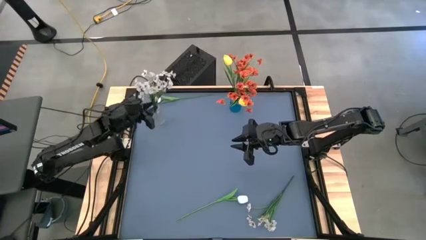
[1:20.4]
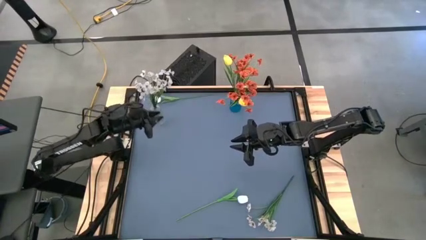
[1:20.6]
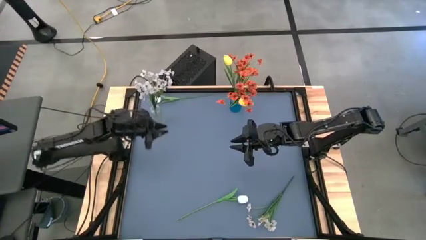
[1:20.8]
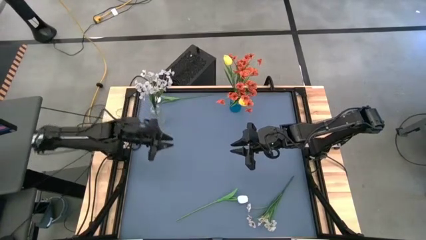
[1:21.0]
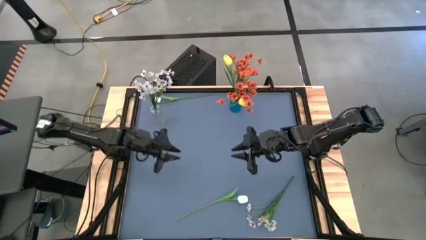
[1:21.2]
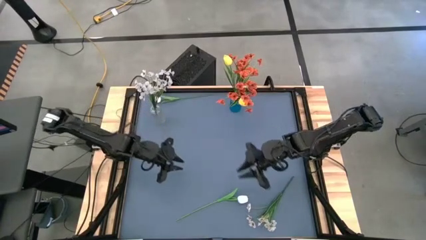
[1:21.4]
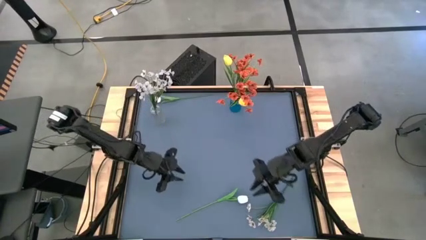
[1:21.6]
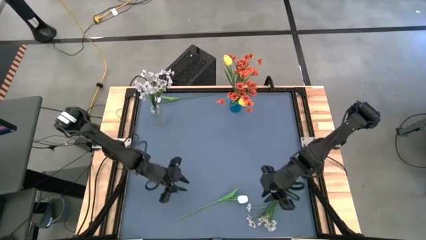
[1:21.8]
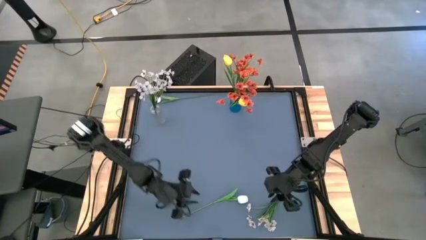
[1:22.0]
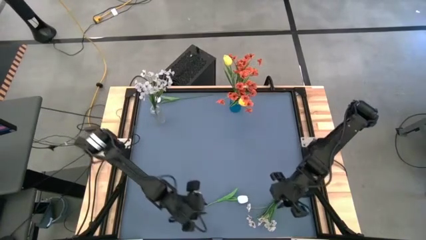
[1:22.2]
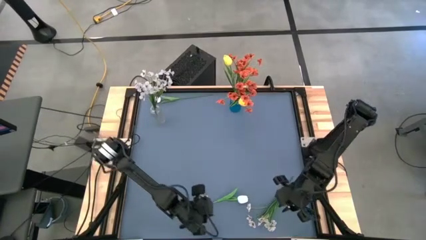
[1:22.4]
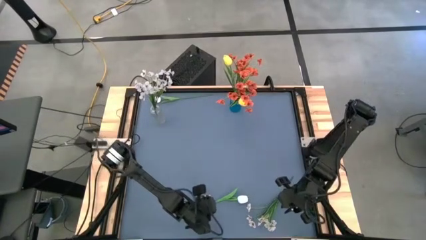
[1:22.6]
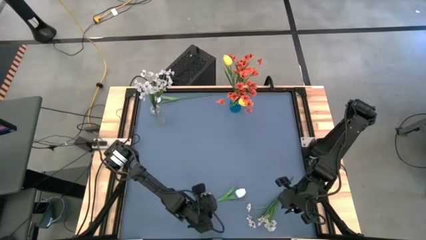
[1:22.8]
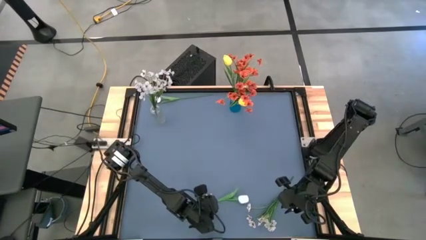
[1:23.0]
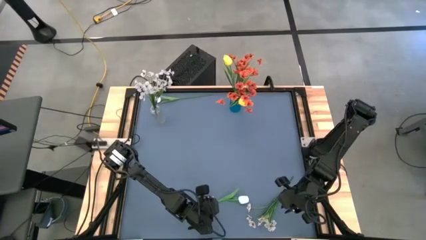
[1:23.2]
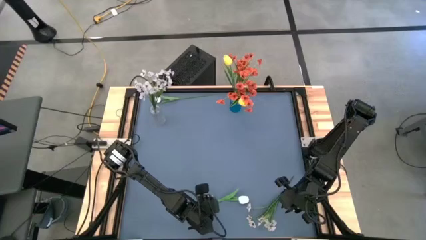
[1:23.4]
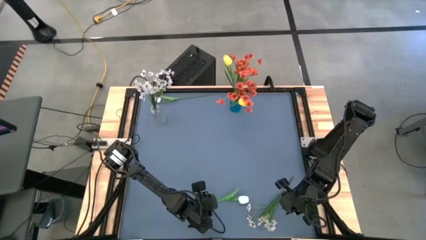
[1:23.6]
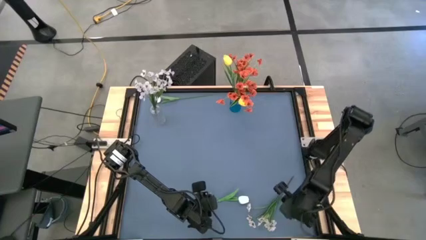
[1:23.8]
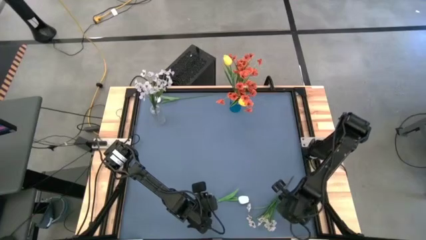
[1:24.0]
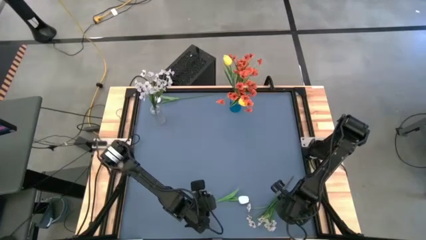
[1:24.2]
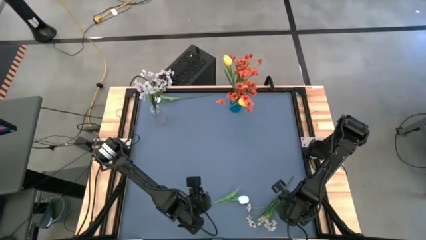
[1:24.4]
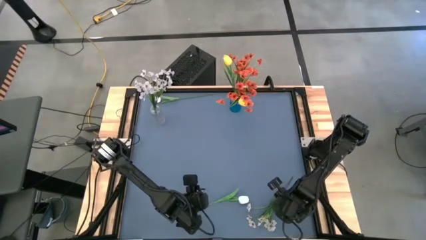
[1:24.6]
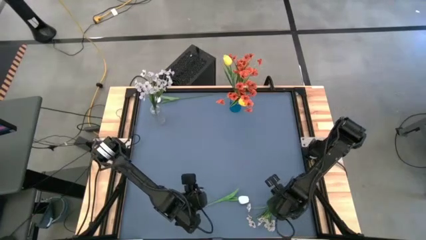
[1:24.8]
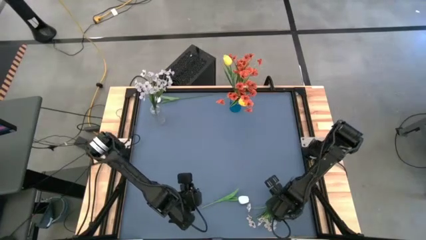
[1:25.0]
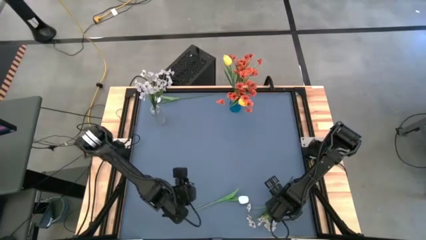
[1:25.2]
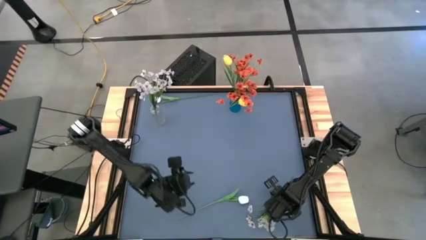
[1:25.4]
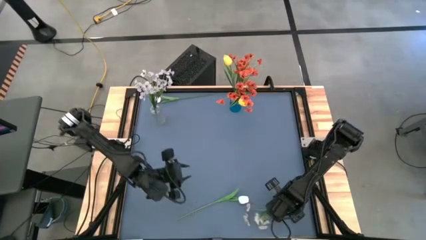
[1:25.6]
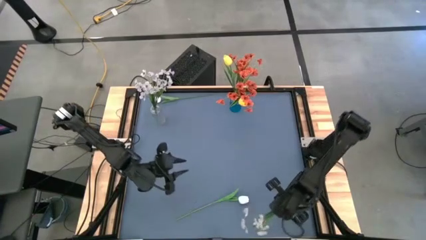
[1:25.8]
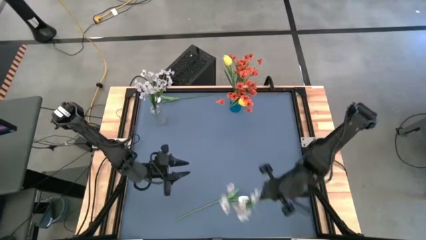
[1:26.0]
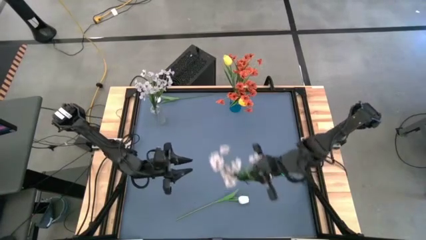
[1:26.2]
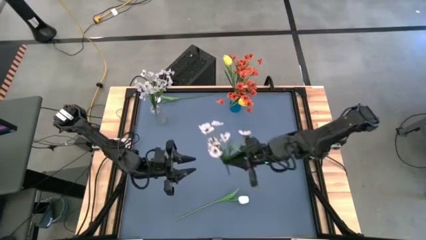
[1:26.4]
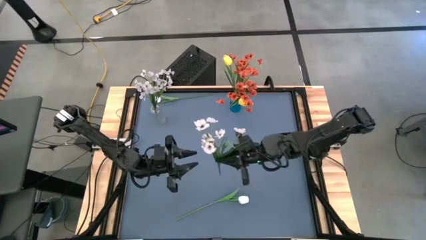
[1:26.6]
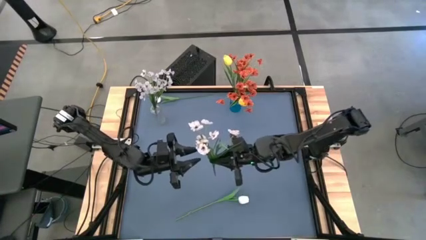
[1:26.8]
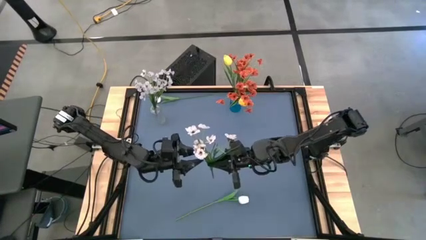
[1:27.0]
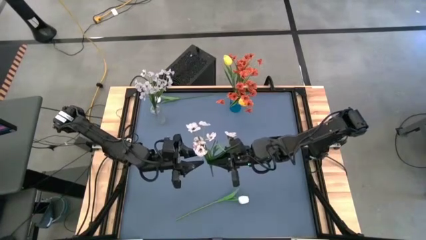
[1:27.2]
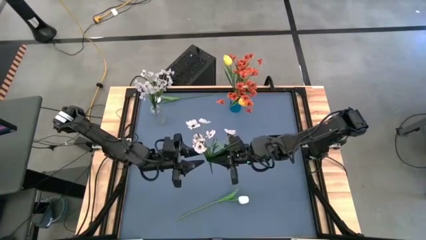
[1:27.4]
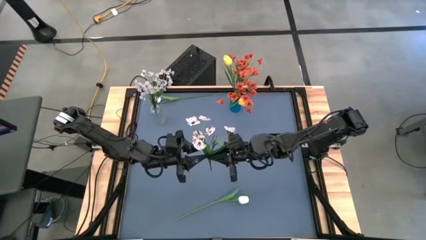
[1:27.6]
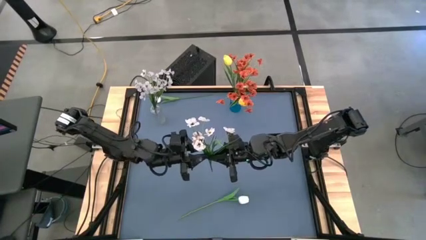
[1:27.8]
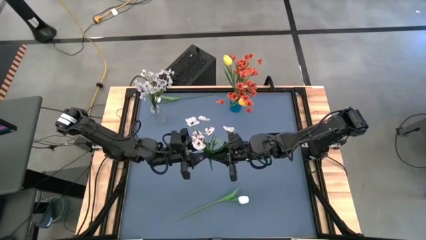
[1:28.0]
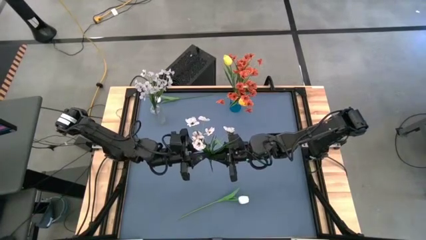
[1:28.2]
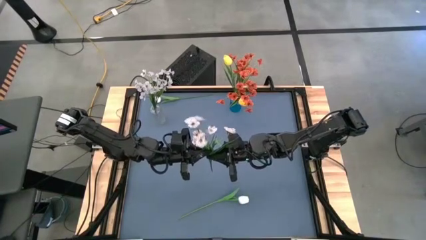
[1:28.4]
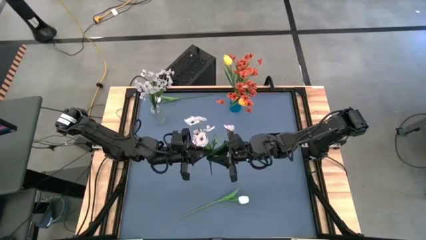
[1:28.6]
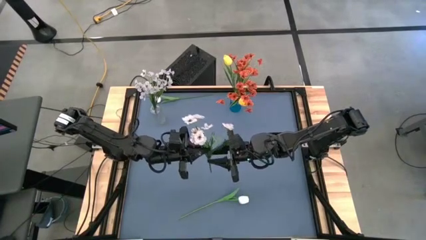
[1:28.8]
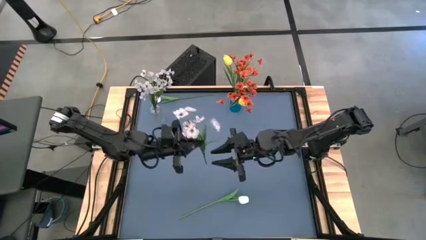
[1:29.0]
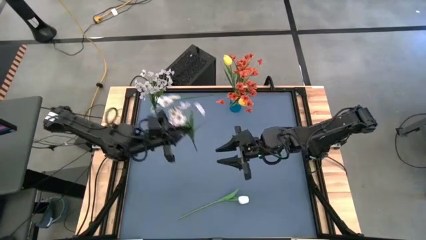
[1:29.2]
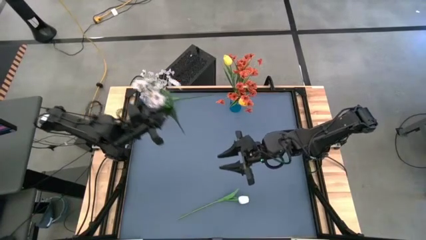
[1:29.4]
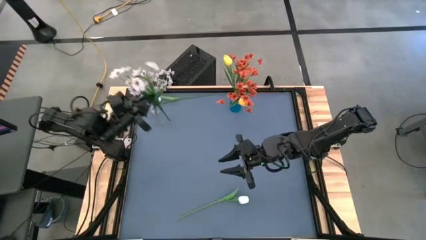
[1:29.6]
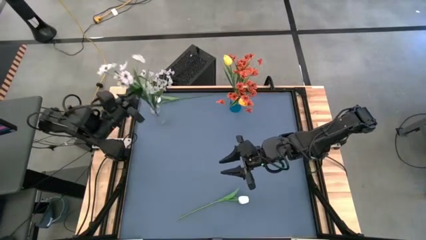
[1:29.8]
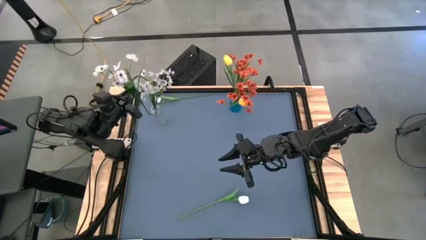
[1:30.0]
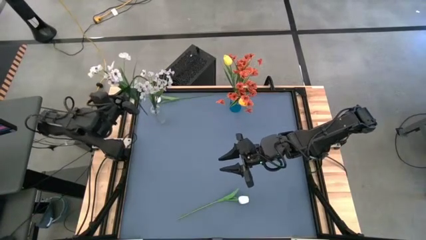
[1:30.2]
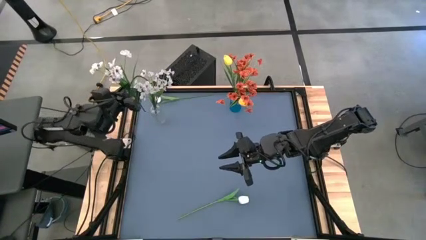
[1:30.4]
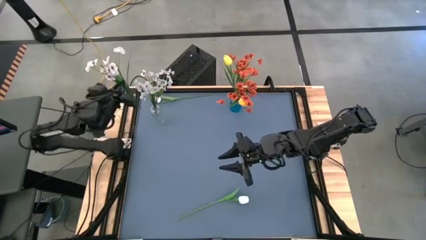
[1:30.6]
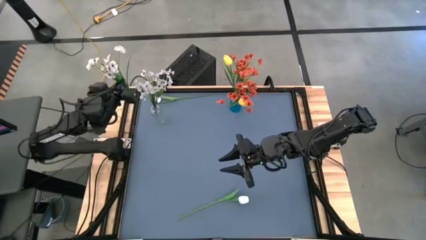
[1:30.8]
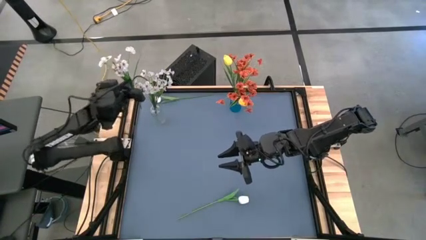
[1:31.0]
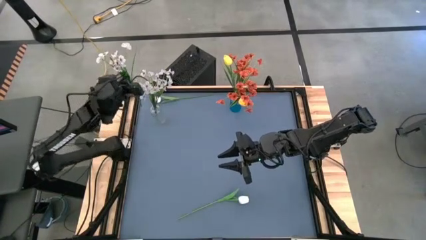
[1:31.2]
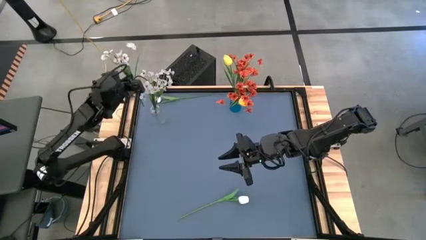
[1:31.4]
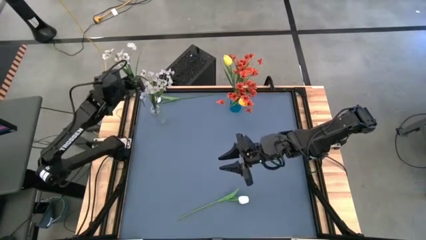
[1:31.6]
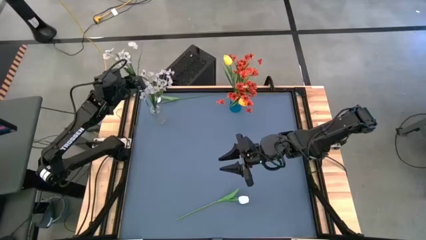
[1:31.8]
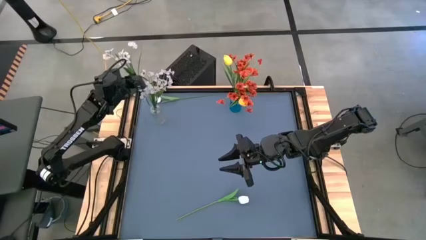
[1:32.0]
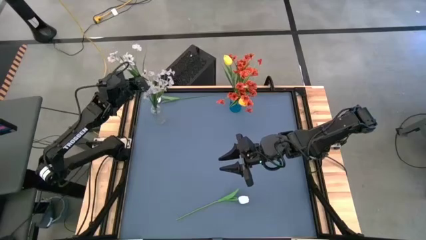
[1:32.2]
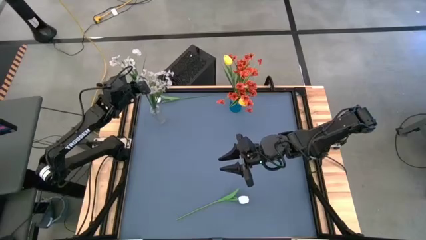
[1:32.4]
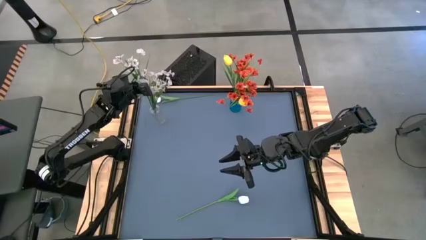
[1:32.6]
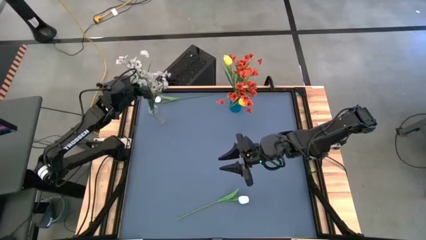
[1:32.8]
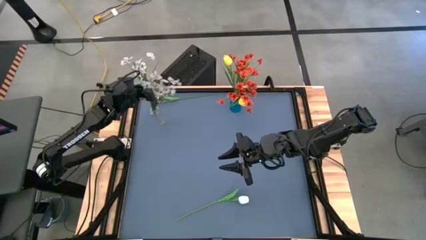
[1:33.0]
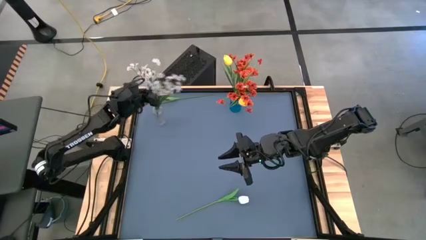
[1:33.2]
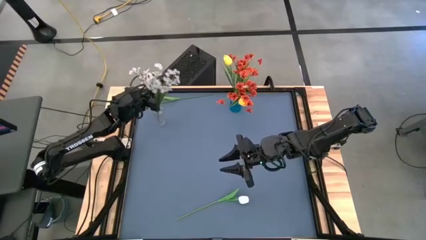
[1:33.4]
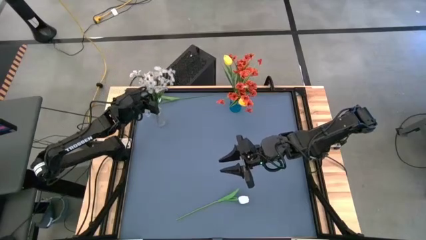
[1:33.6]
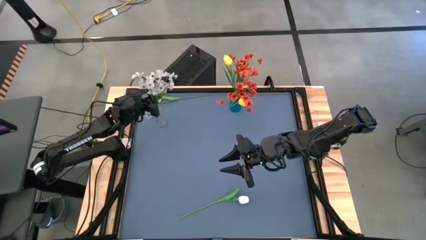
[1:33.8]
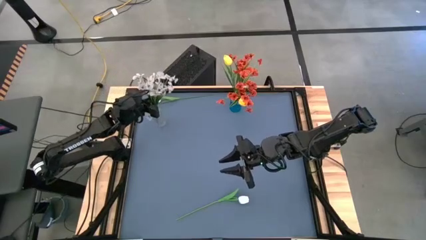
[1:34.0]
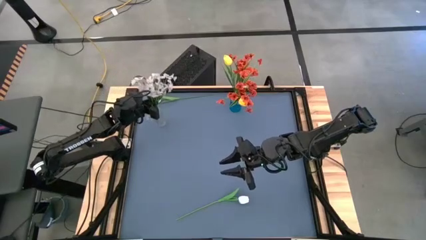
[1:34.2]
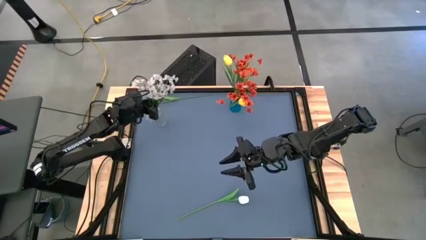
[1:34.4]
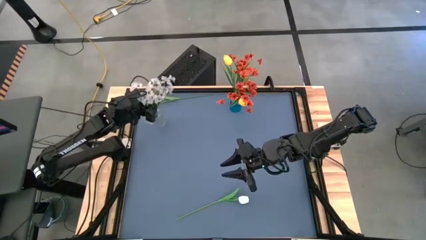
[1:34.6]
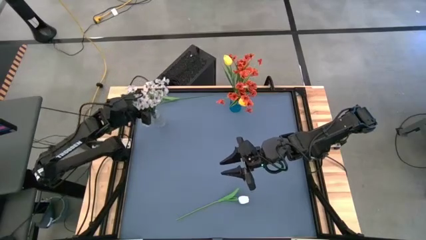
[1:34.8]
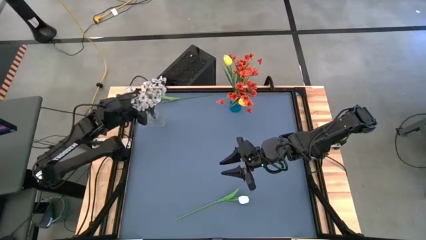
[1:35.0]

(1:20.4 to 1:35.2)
Task: Sort flowers into vase by color
Put the white flowers into the transparent vase

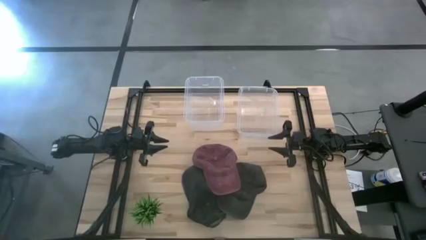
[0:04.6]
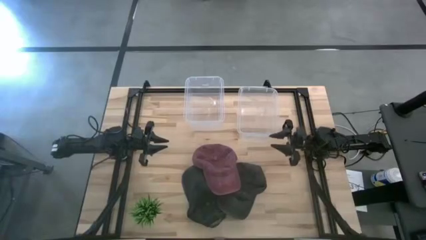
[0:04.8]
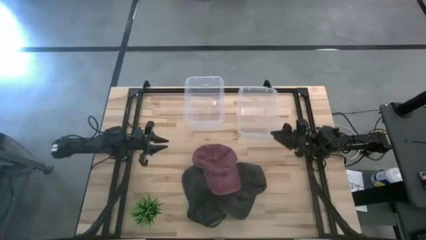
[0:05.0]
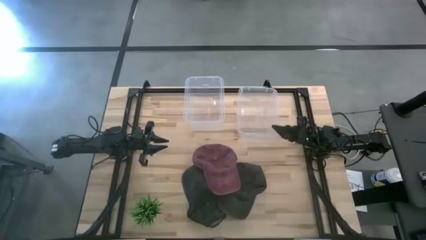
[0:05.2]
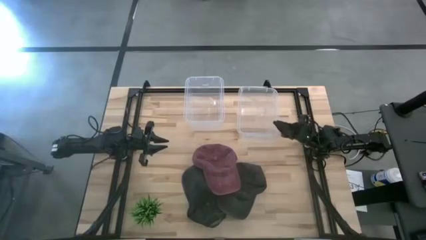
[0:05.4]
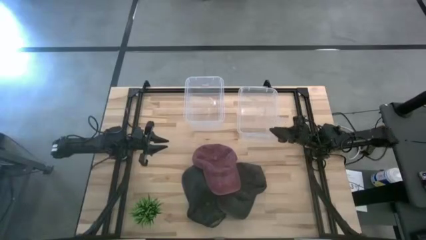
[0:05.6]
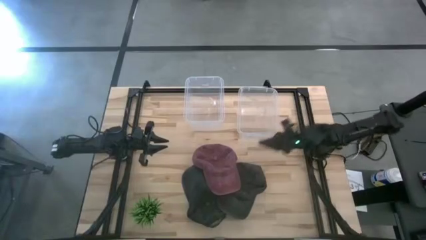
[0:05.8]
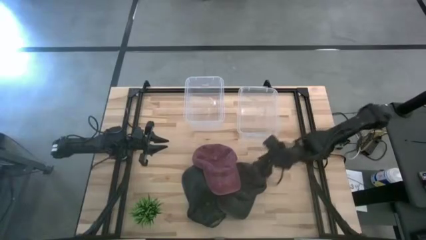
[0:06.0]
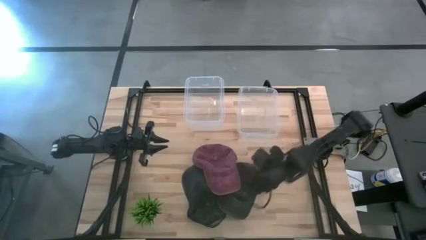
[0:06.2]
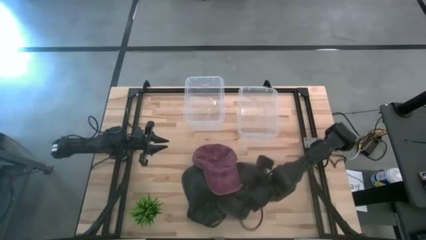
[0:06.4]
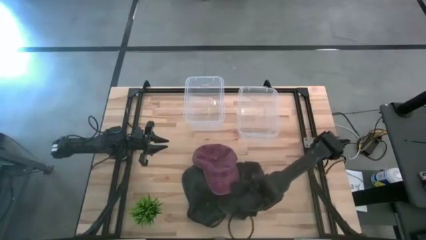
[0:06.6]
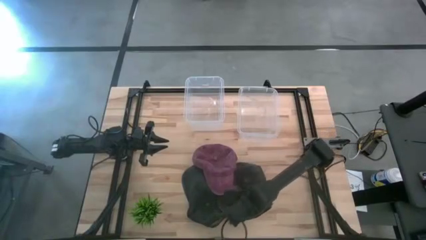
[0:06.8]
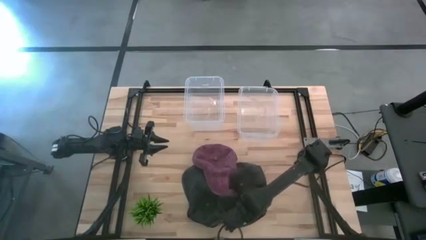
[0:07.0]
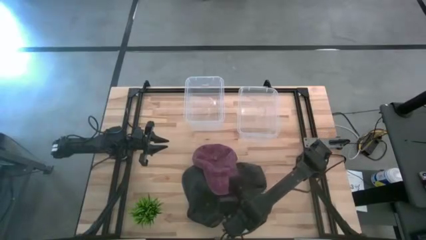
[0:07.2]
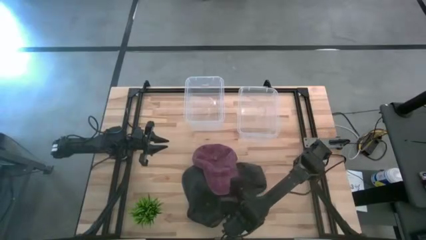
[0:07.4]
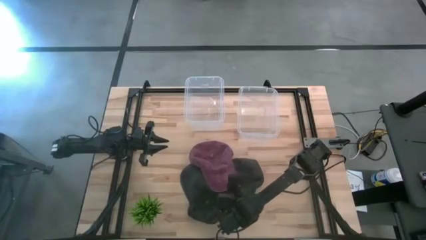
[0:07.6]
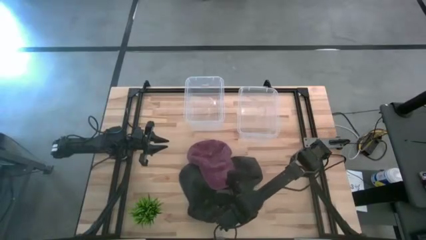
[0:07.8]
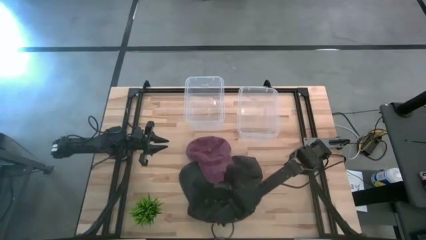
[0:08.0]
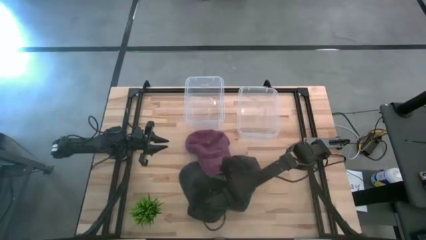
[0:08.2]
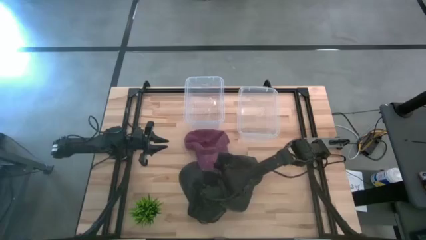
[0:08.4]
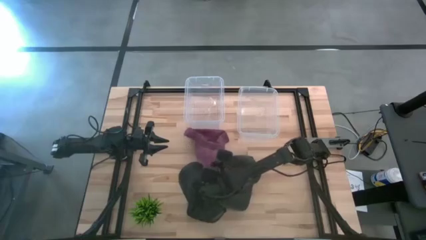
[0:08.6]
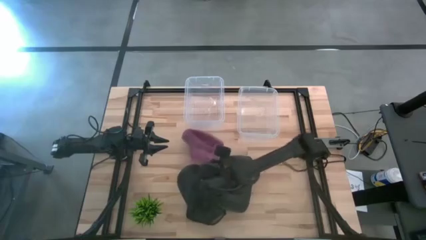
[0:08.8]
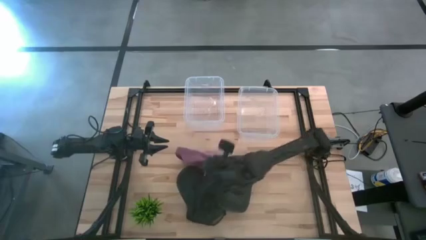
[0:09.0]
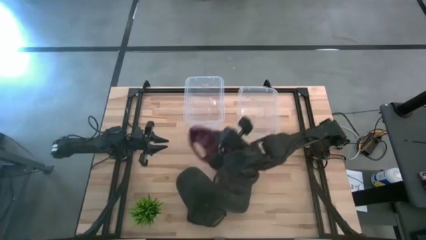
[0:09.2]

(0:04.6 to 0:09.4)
Task: Pick & Place hat
Put the red cap into the right transparent bin
